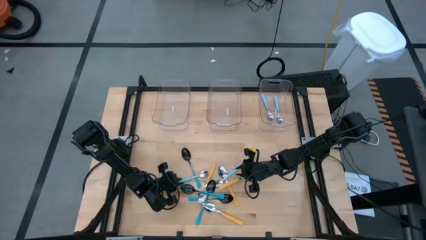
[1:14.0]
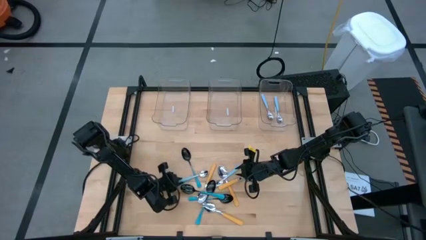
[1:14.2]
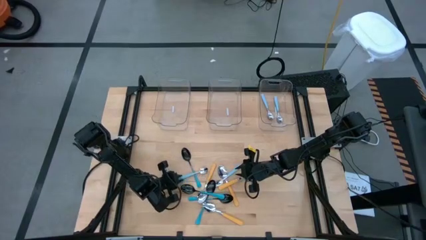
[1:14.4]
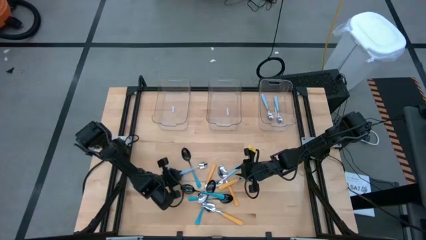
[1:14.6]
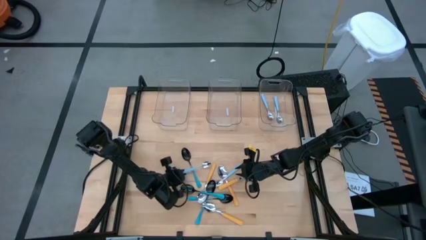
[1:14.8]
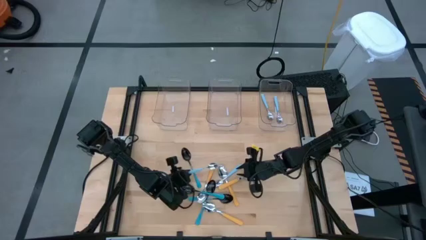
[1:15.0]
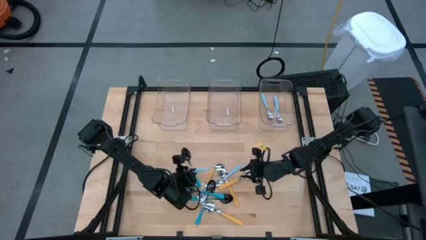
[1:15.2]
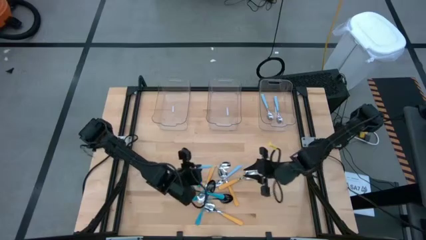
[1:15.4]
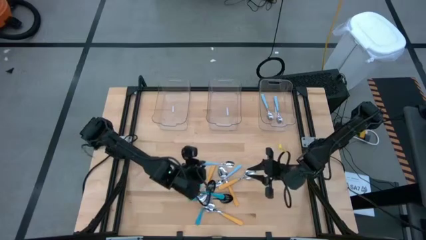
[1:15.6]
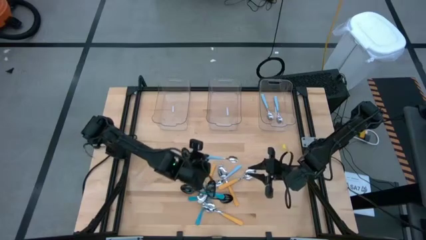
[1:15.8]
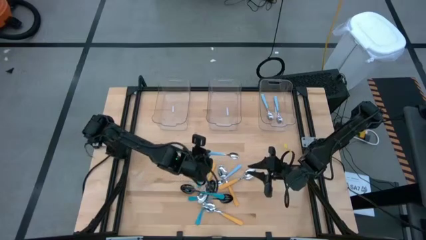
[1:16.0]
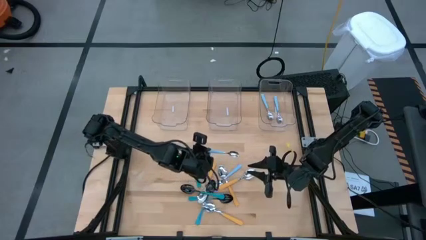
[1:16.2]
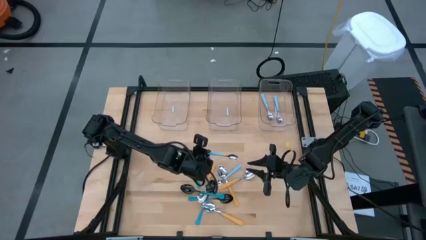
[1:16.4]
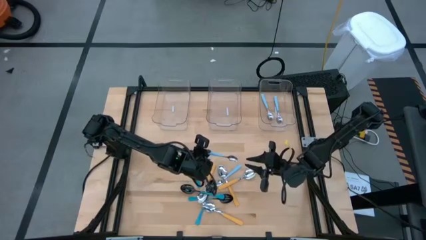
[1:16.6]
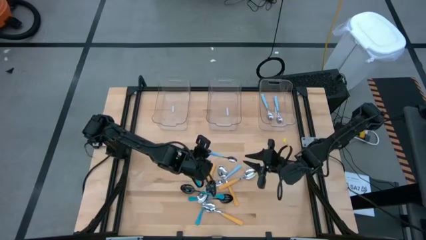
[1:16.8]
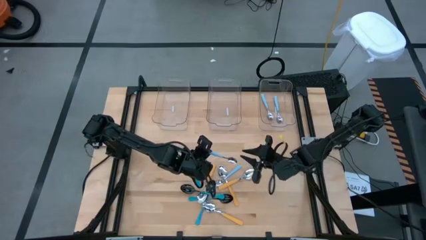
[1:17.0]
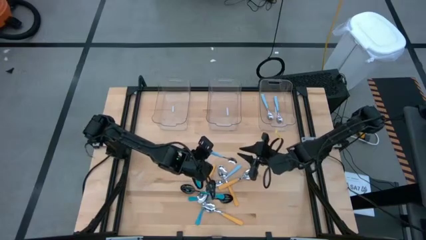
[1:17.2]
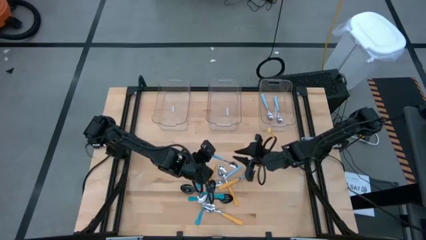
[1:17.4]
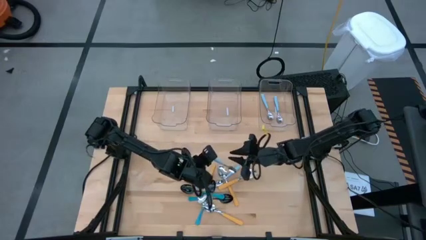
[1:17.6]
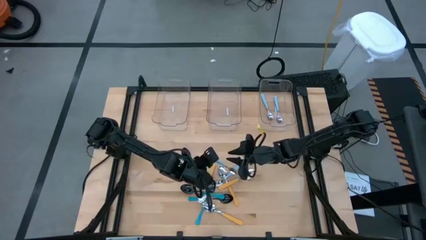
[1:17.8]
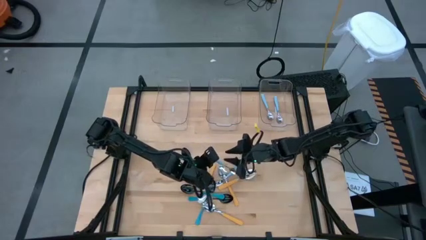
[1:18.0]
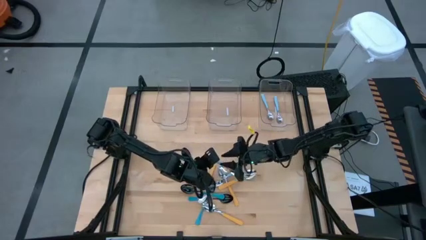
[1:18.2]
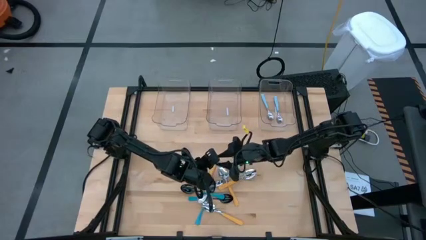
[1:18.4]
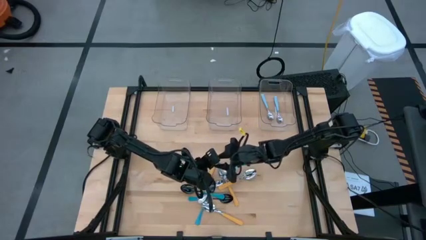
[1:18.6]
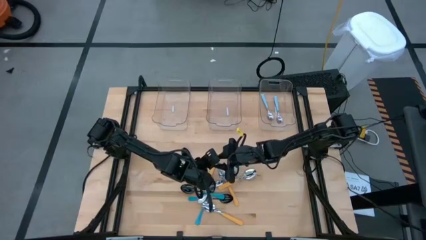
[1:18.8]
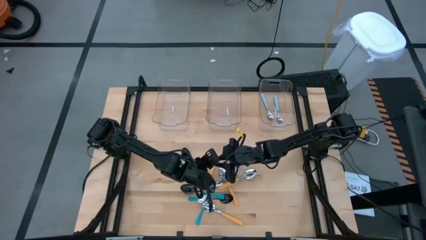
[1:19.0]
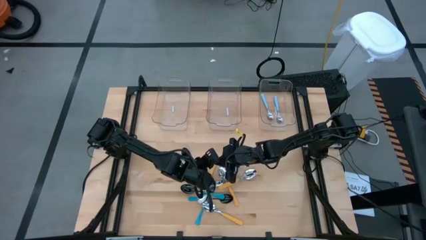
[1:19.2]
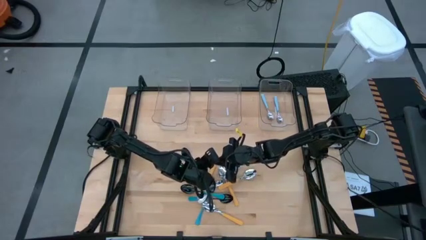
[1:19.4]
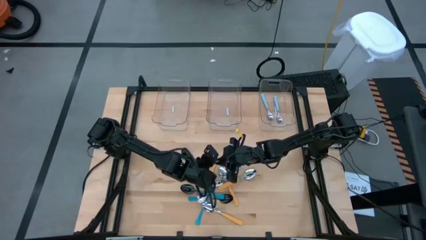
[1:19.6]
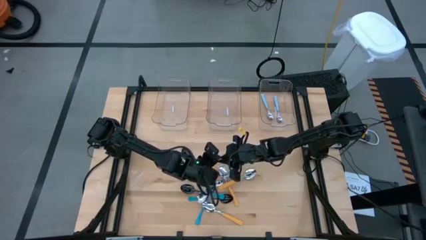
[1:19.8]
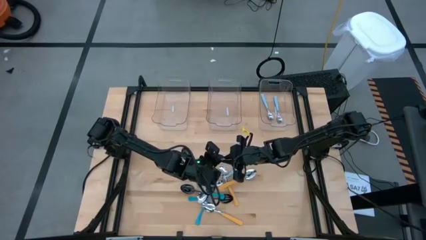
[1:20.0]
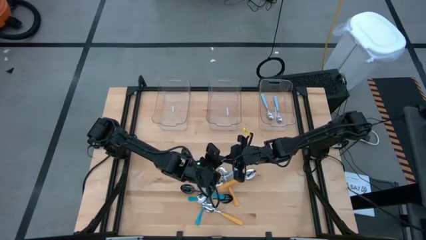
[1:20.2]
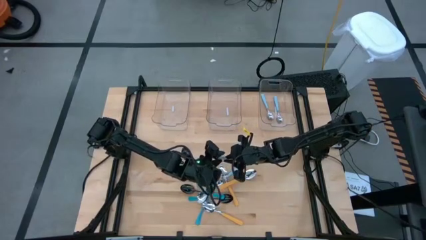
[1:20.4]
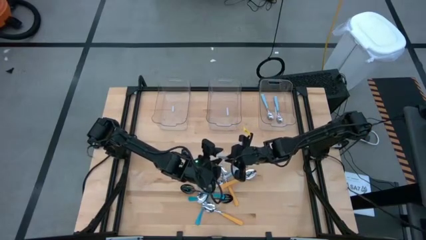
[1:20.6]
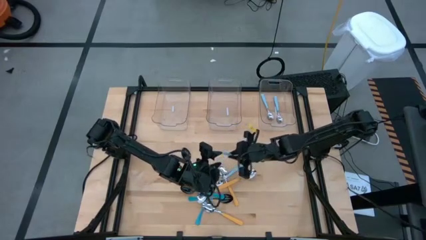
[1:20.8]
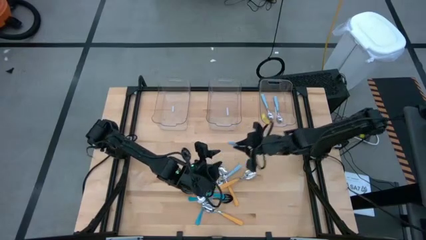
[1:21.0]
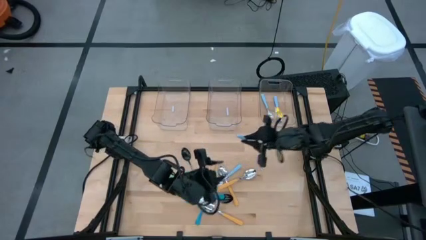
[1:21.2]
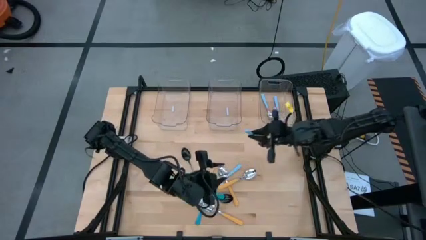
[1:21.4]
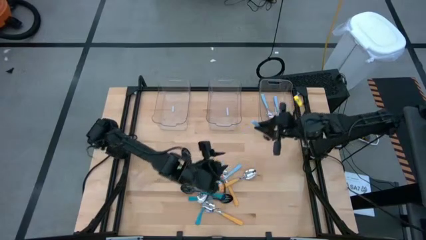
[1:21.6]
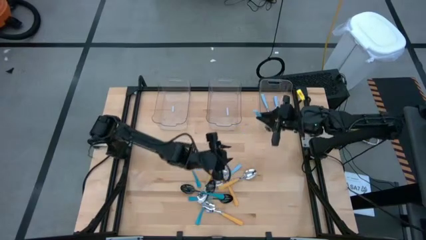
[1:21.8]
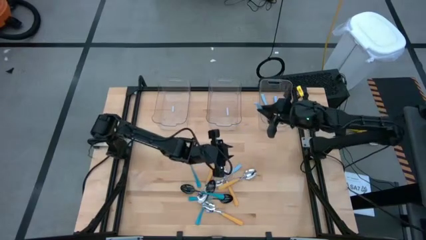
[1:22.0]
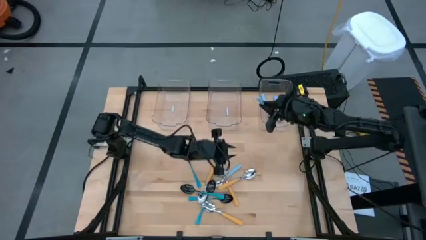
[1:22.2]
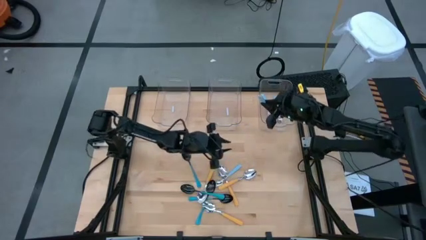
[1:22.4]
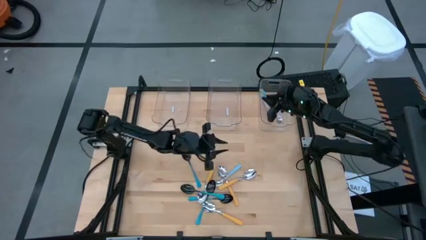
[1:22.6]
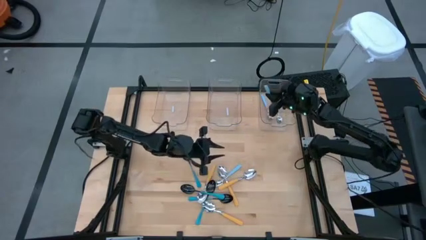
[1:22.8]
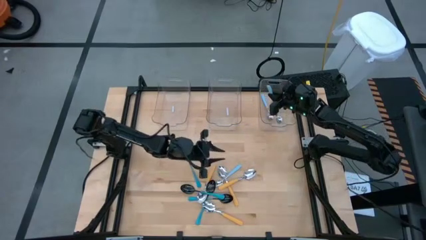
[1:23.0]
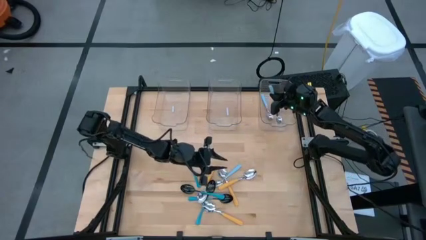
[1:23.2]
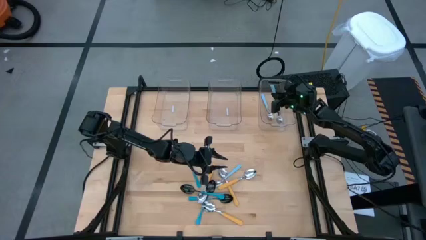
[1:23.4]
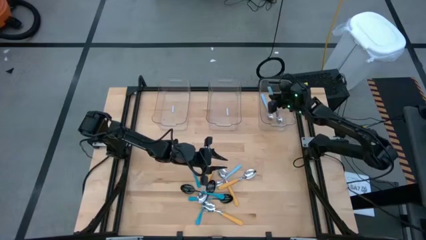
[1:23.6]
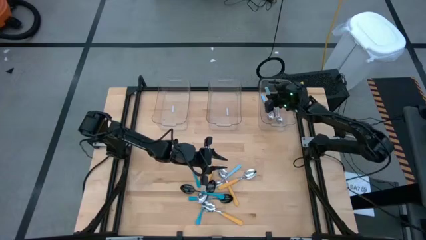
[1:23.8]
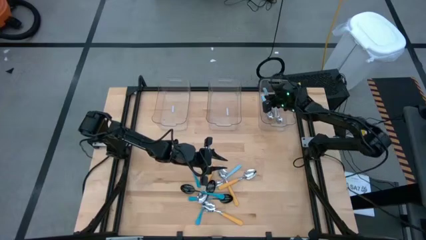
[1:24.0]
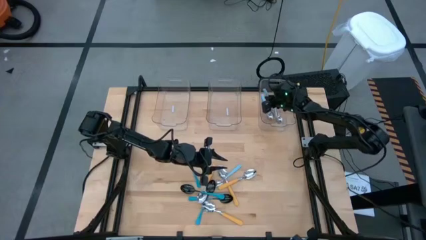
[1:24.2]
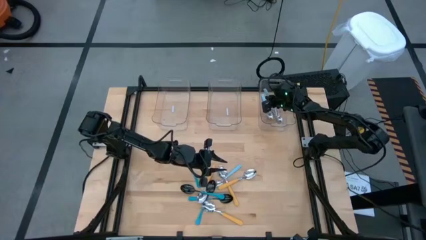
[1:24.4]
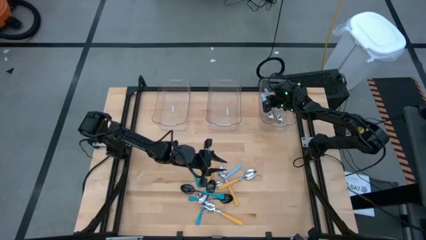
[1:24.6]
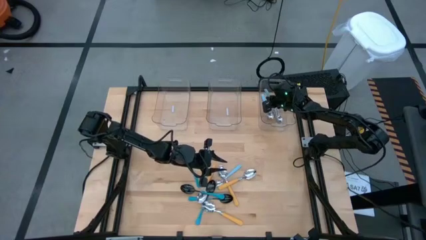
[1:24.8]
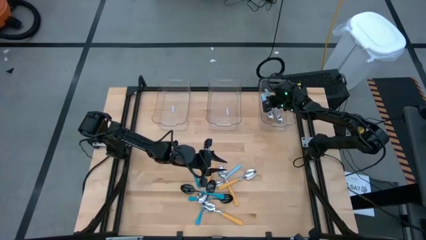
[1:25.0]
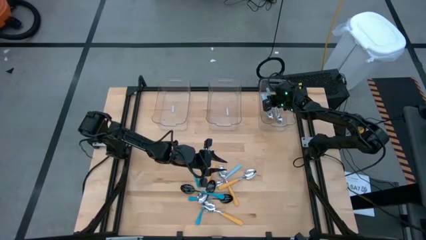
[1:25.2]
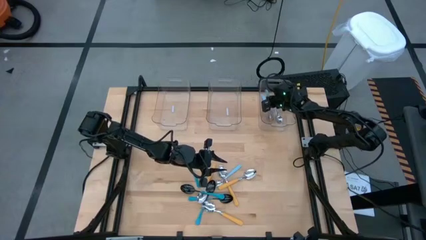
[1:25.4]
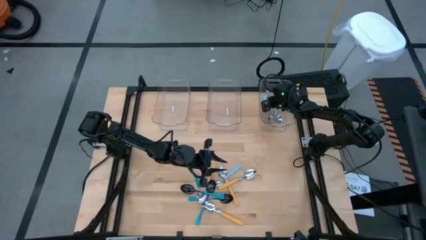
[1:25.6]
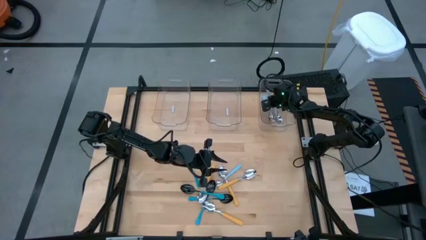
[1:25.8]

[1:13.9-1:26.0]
Task: Sort silverware by color (type)
Put the light blue spoon into the right transparent bin

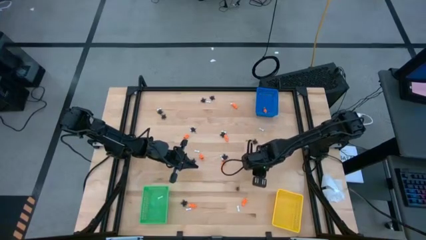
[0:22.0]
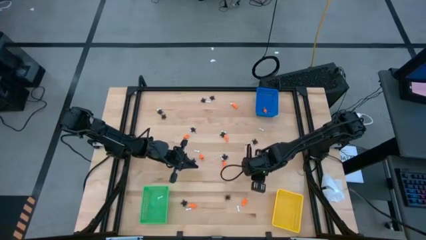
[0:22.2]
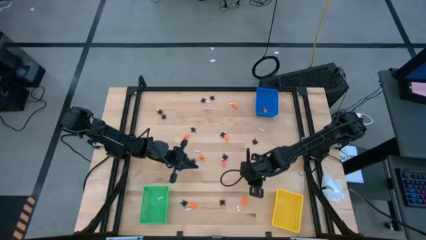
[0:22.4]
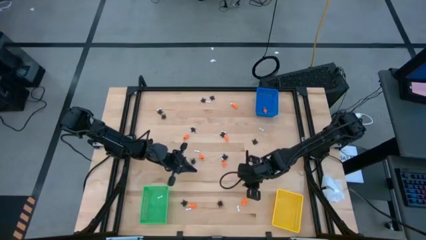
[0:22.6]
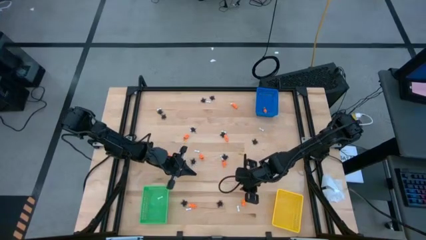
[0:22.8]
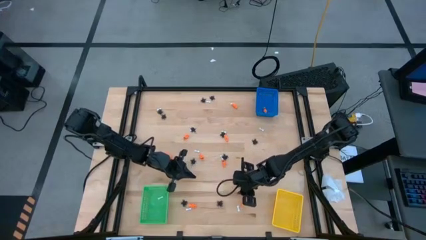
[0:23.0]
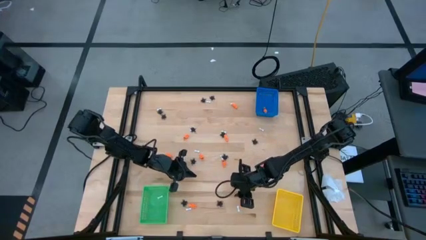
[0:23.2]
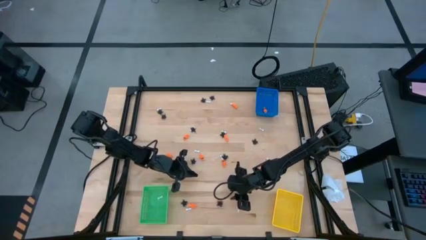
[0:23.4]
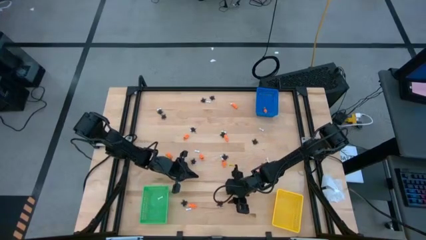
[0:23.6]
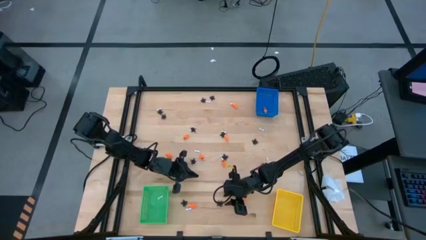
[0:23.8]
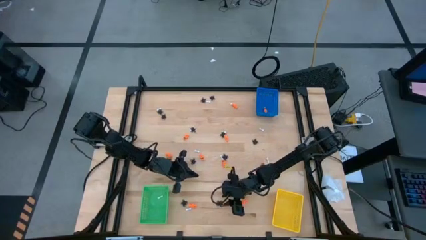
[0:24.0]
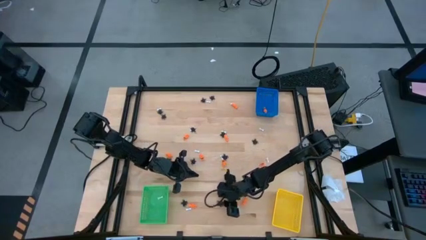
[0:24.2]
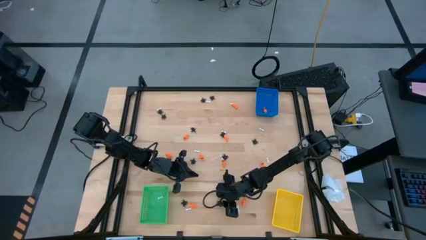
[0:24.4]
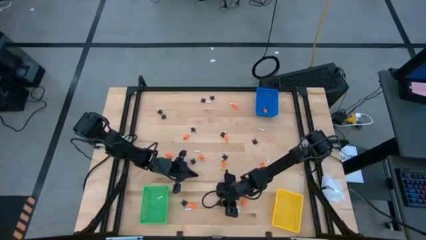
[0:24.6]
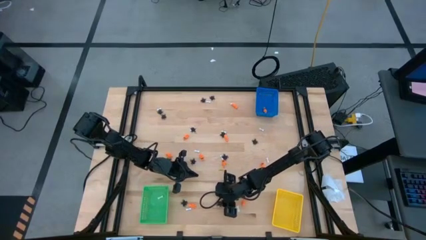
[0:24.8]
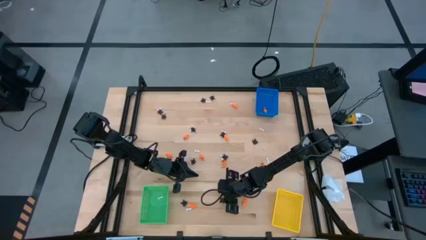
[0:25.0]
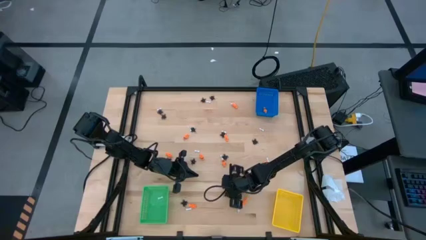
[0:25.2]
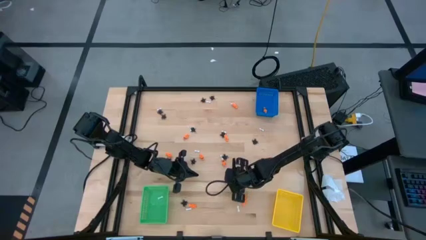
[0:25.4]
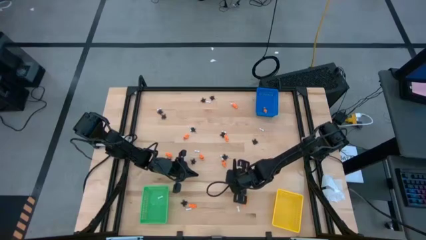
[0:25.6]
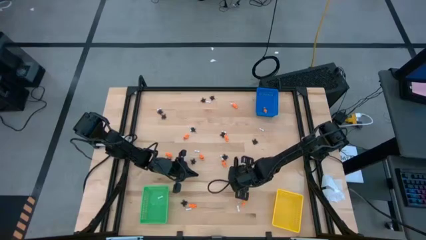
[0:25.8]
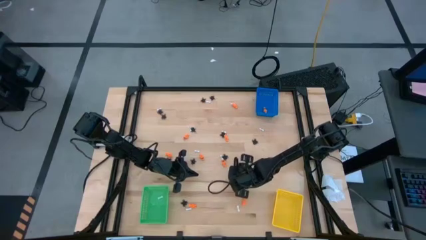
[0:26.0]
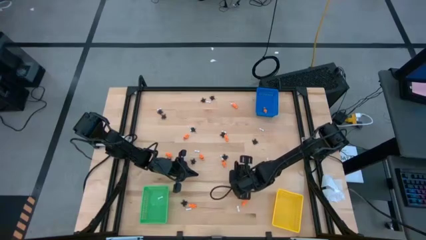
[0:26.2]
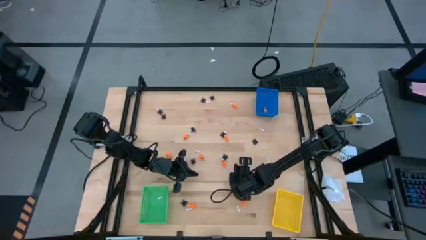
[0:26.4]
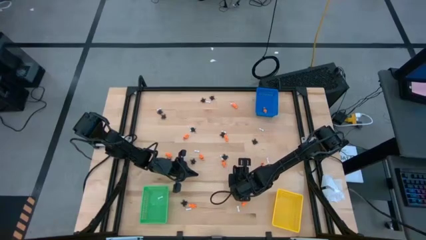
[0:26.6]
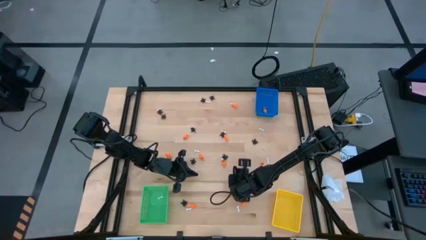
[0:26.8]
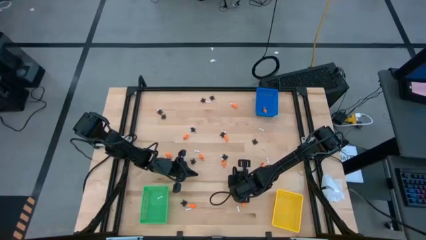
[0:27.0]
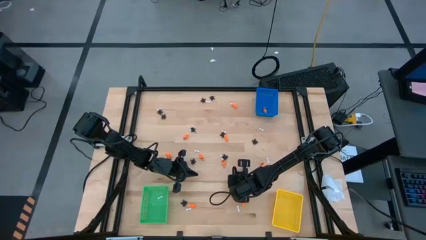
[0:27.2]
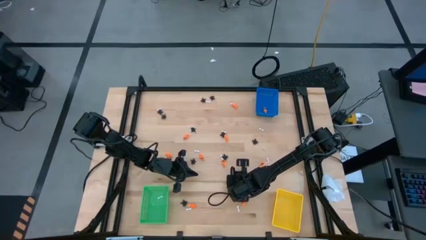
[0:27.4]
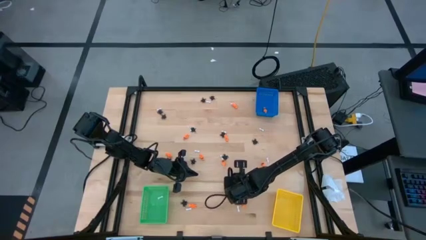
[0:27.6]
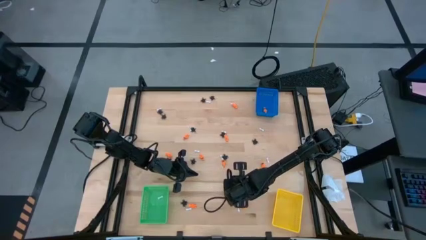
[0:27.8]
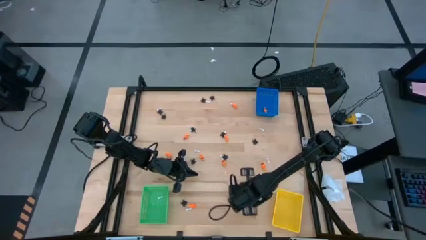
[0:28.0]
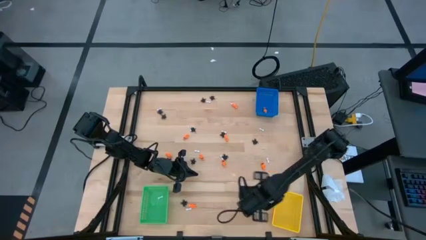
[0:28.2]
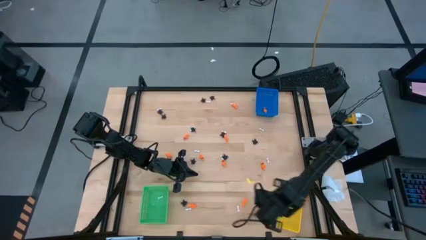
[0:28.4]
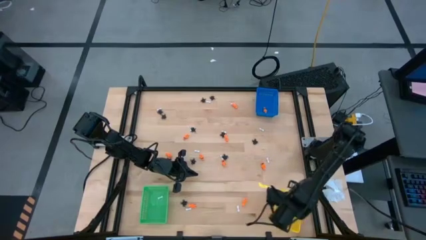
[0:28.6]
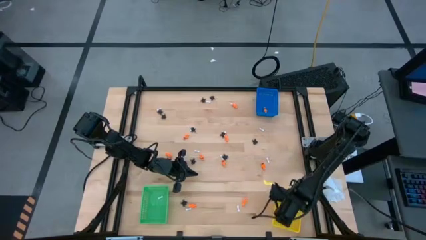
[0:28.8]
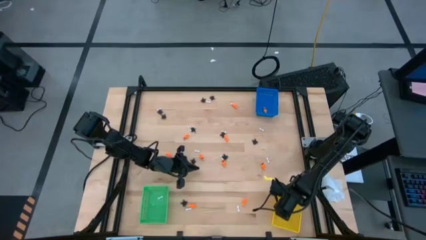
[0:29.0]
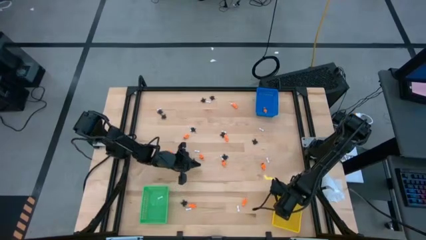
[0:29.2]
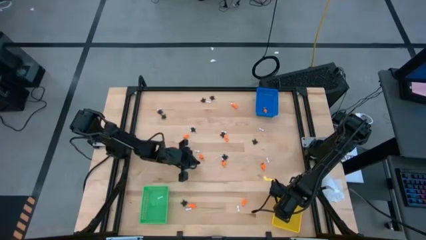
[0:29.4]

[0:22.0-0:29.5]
Task: Sort Halloween decoration
Put the black spider toy into the yellow bin
